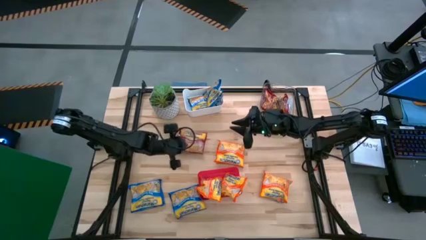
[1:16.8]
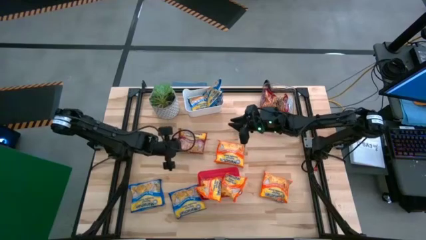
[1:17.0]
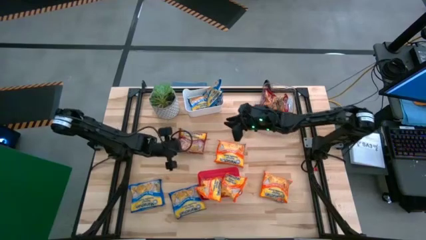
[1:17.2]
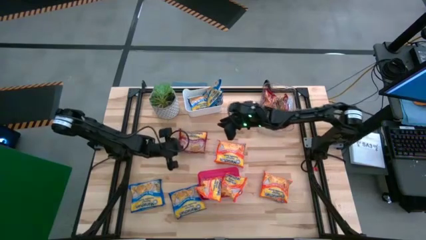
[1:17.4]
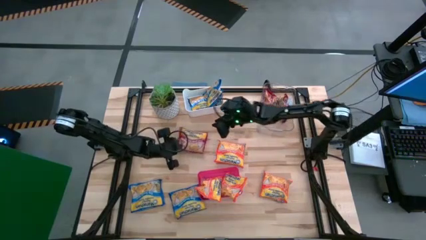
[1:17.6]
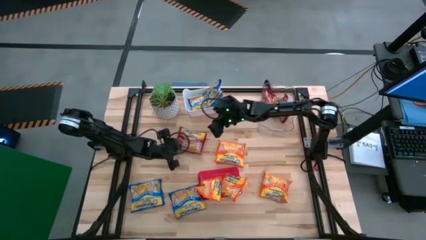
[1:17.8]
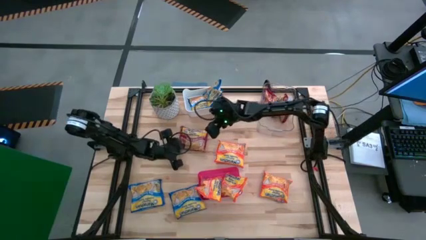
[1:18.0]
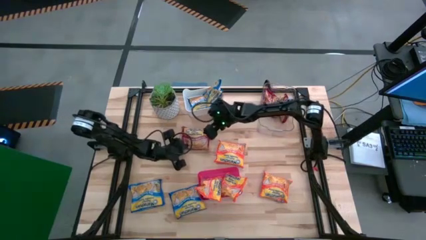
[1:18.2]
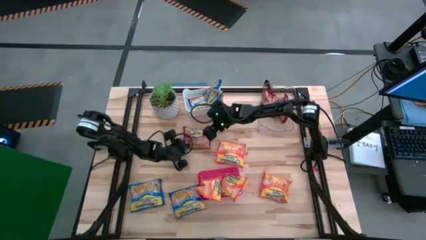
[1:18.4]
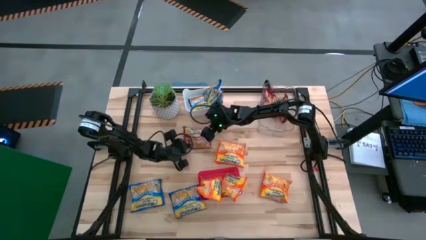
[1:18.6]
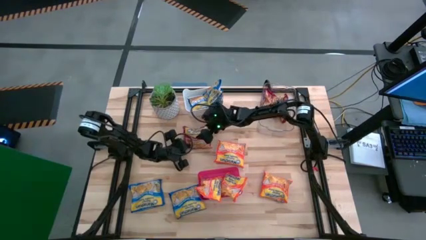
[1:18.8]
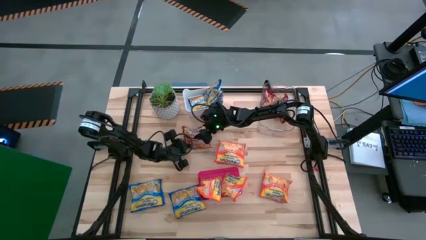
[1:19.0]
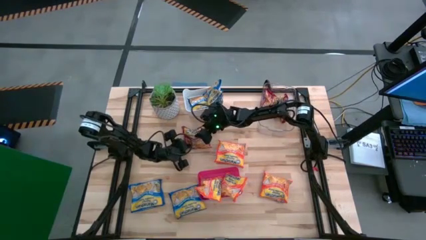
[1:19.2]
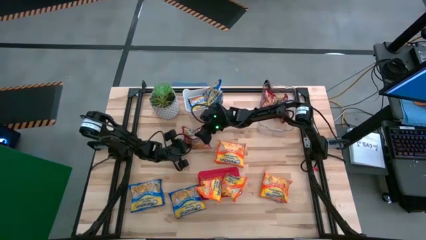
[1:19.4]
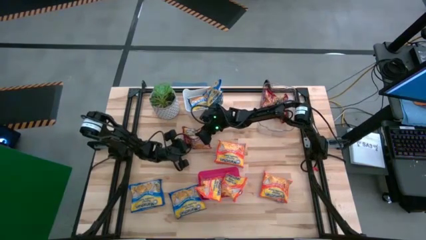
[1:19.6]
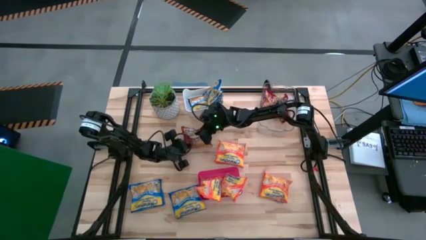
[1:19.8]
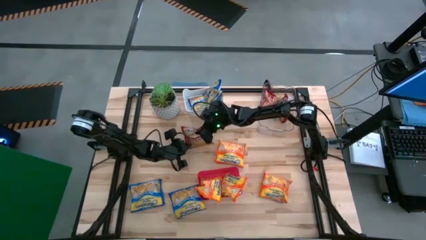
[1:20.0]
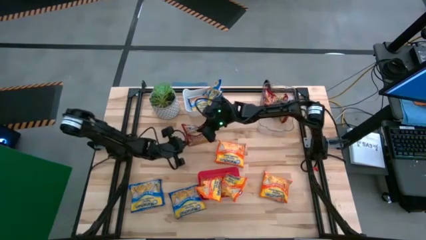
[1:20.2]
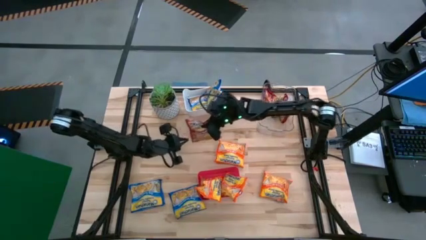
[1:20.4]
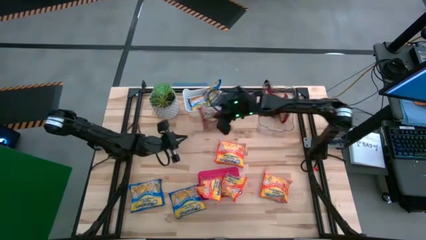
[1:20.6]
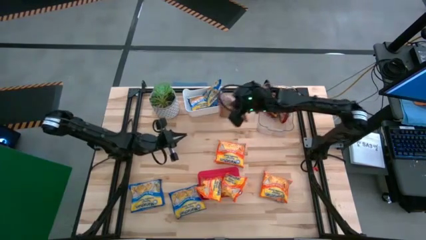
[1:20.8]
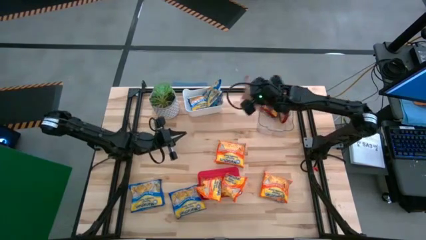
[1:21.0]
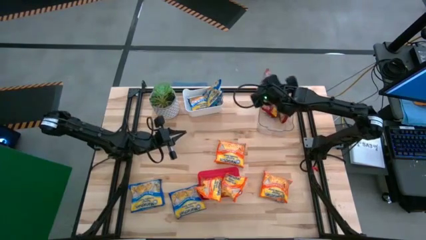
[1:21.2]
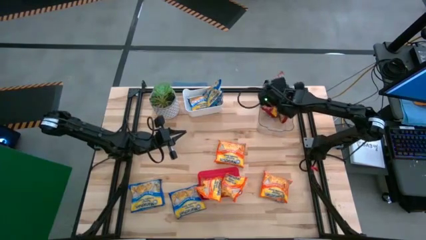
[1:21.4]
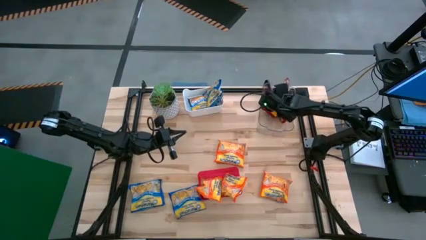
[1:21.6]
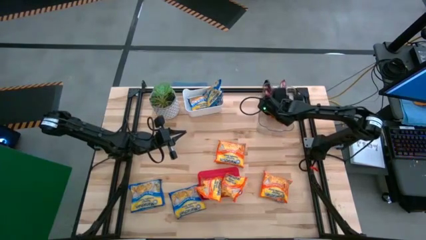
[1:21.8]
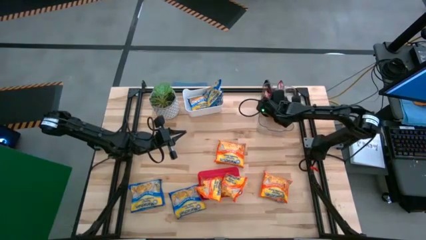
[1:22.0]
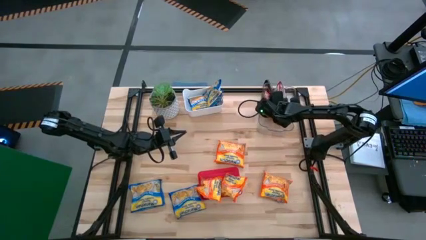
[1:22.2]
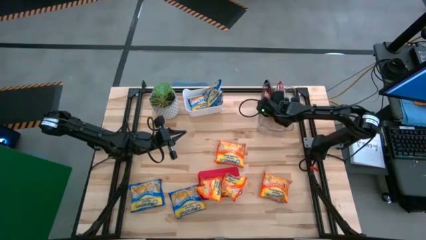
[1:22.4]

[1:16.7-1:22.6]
Task: Sort Maruchan noodles
Put the red noodle pack into the transparent bin

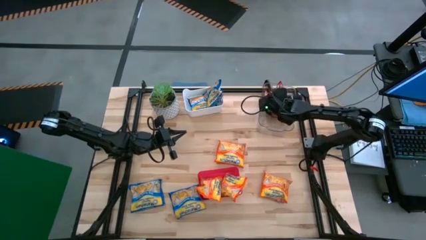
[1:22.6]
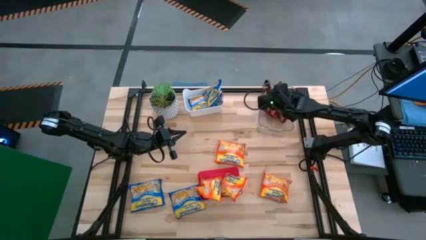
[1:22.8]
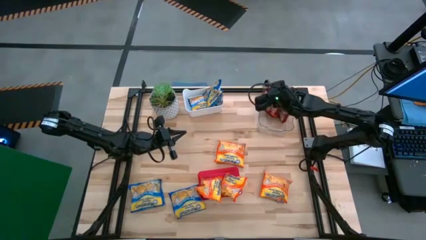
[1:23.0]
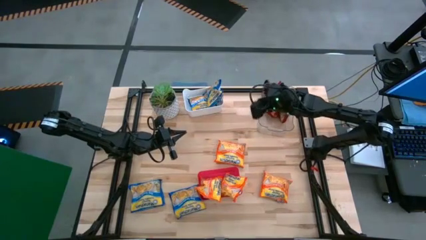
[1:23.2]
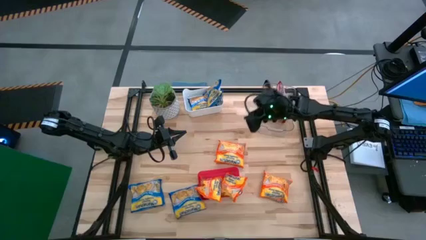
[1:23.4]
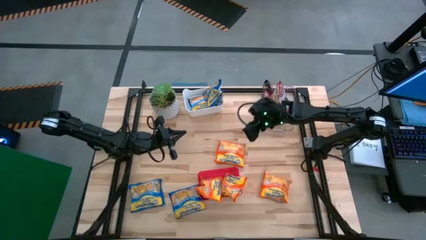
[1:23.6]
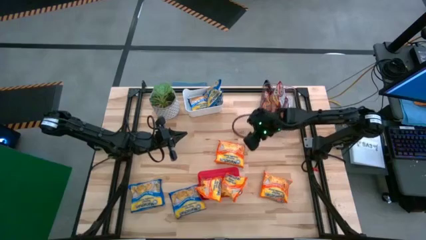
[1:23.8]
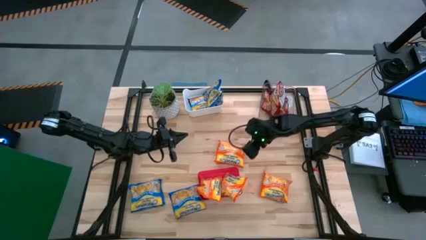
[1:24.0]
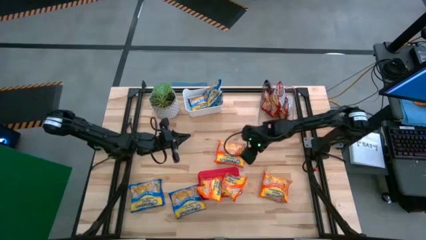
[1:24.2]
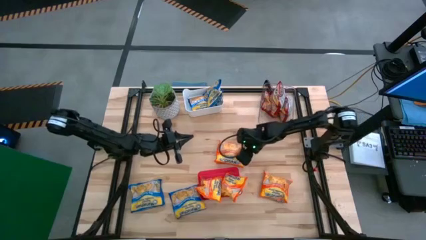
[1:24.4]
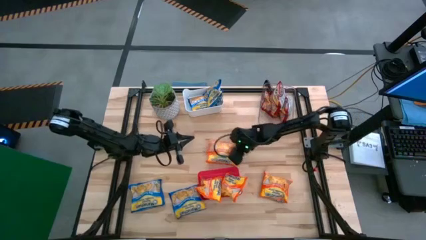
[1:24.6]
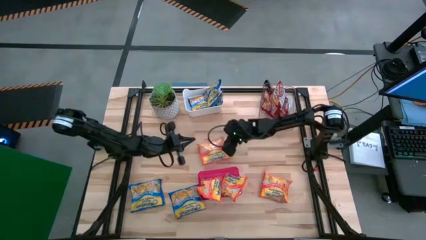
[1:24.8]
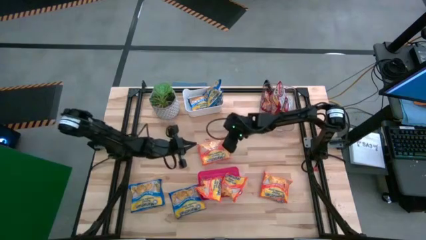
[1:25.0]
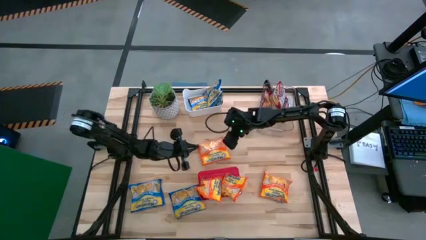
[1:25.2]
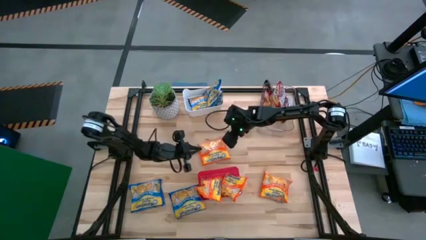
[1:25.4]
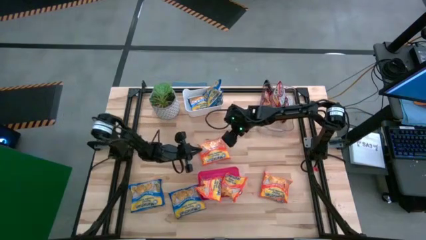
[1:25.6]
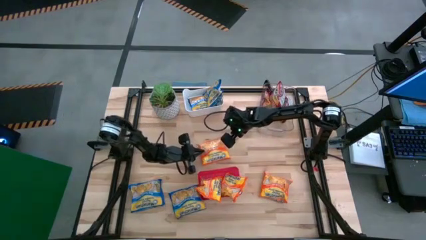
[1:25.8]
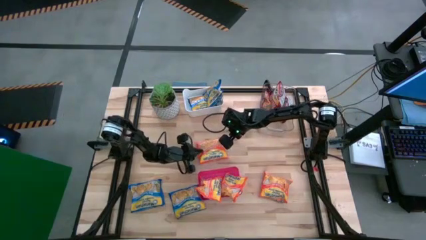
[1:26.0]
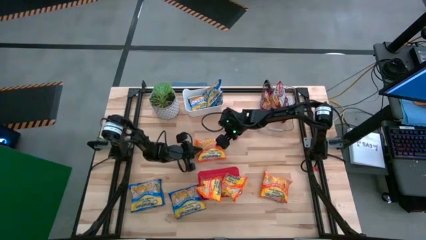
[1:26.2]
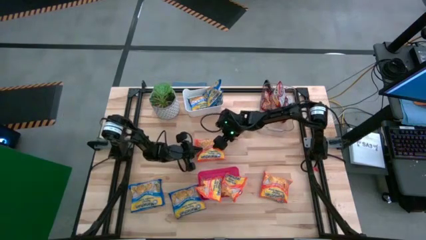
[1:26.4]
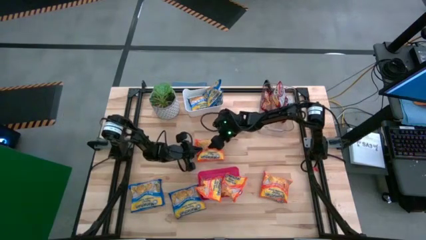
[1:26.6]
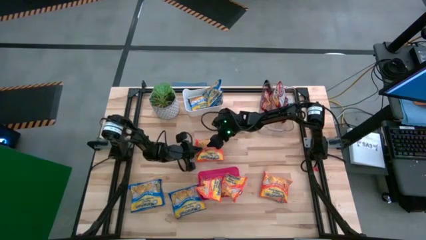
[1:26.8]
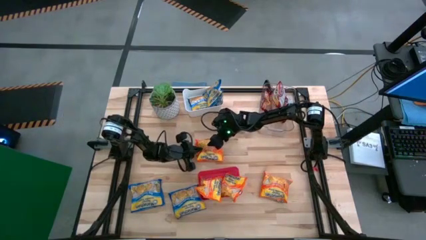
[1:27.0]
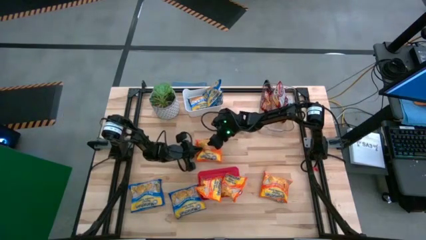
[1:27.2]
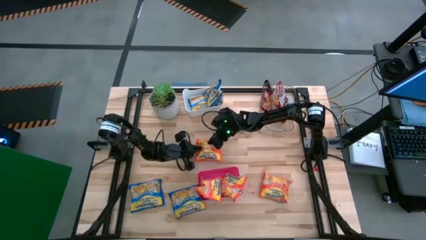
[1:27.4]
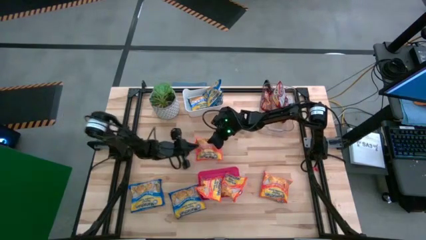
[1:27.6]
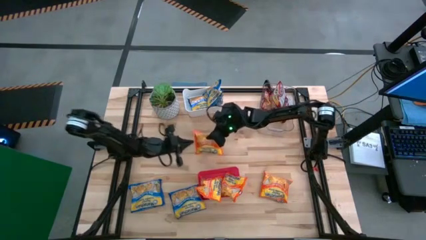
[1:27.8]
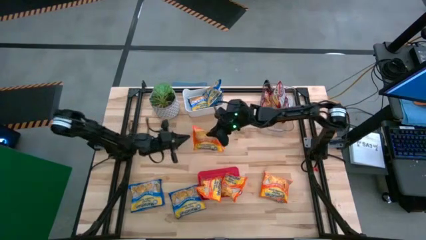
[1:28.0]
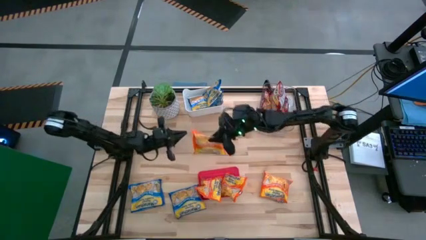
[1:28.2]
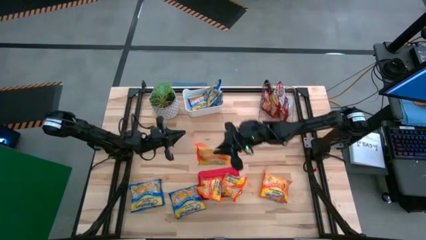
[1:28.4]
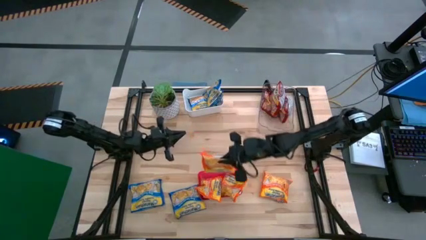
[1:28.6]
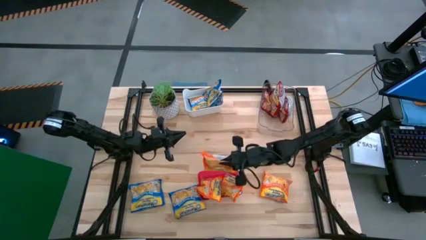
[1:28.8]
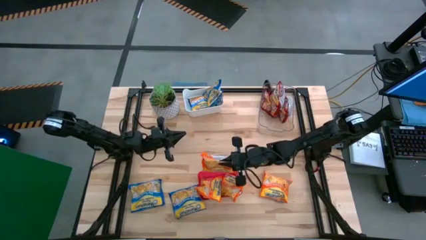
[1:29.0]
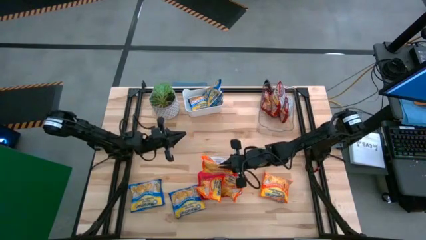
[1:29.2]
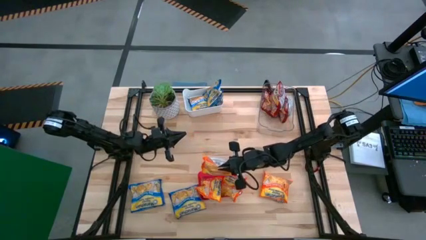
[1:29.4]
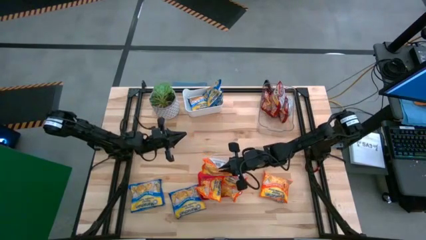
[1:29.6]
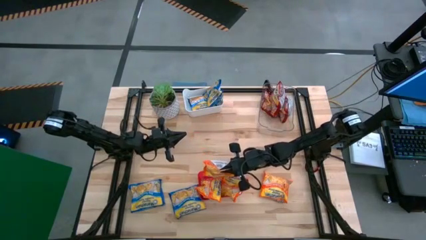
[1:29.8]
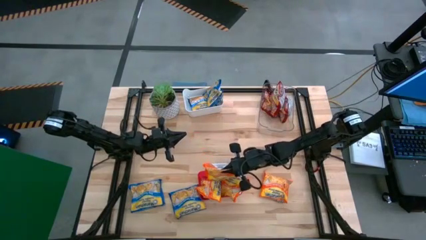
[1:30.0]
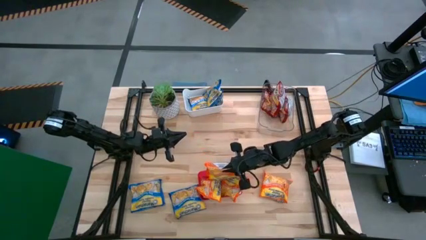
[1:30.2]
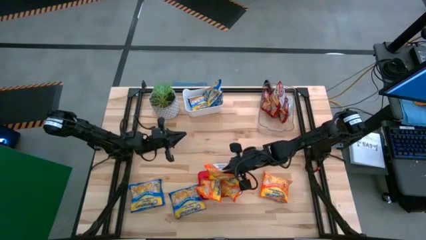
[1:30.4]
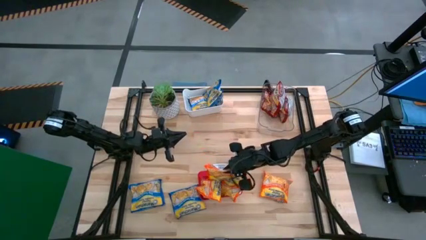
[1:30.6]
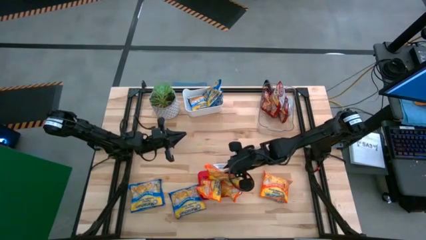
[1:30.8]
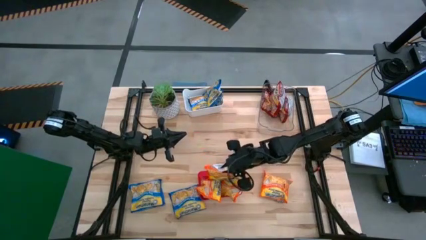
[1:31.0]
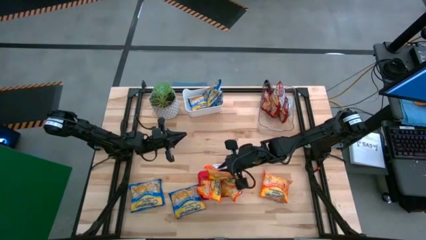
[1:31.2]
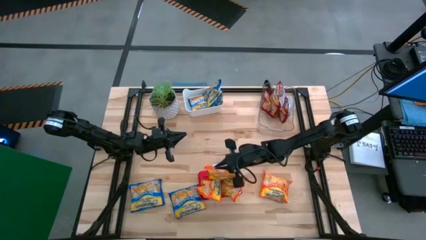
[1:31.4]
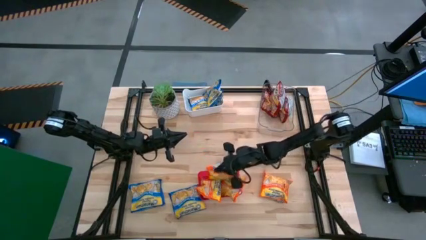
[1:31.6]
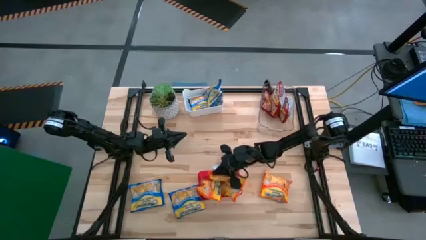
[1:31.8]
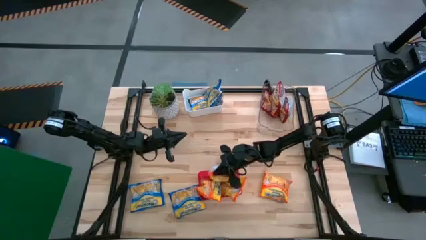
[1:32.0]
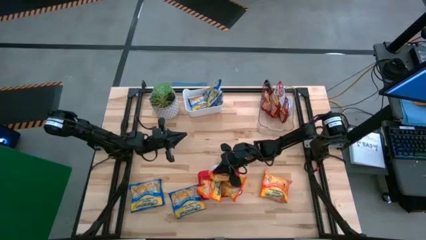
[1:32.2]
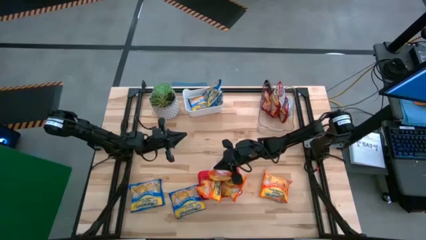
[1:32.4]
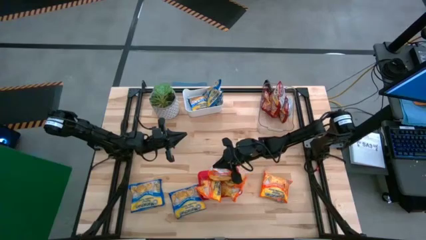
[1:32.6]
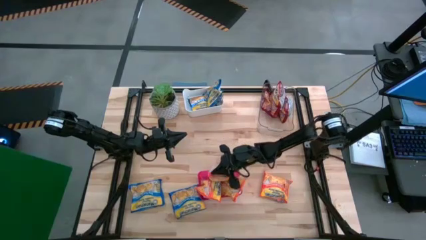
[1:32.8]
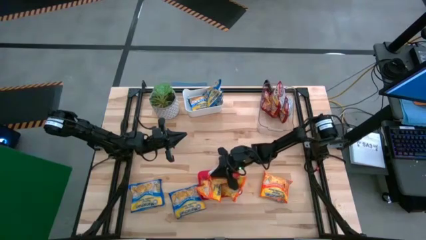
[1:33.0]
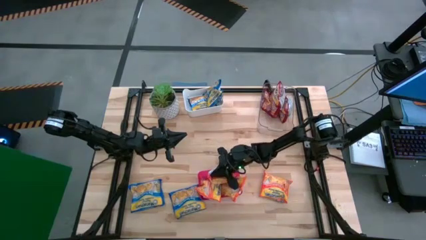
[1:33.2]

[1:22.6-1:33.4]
Put the orange noodle pack into the red bin

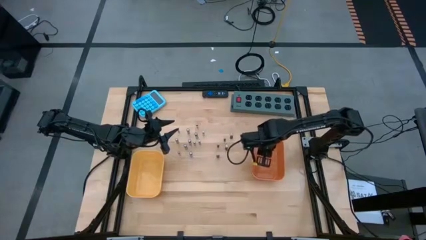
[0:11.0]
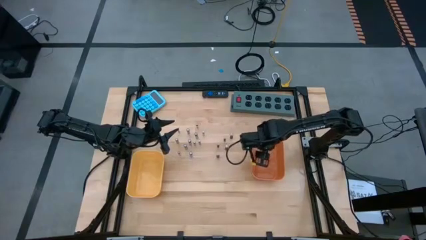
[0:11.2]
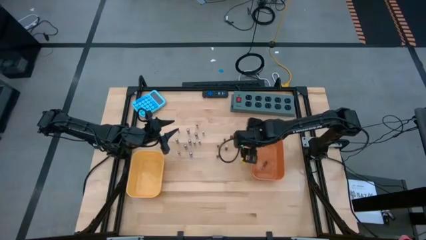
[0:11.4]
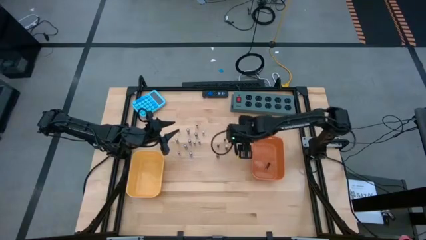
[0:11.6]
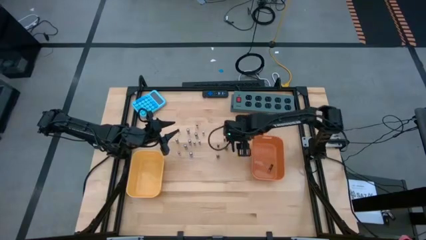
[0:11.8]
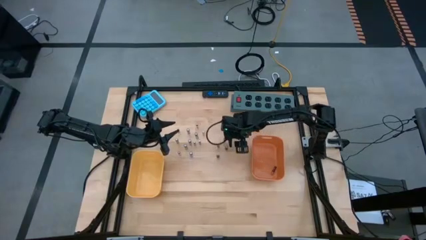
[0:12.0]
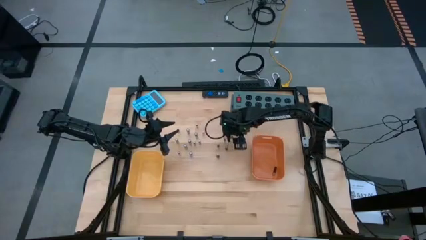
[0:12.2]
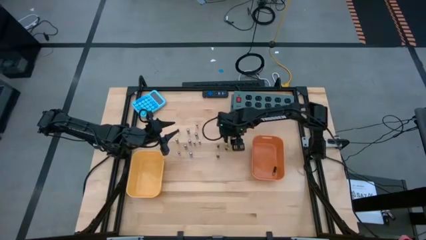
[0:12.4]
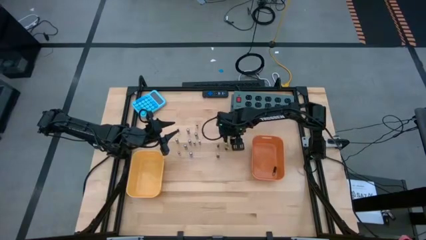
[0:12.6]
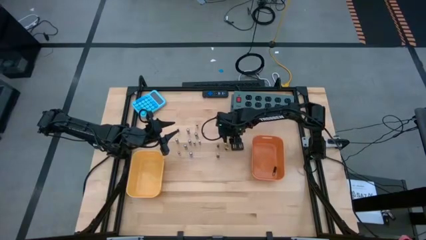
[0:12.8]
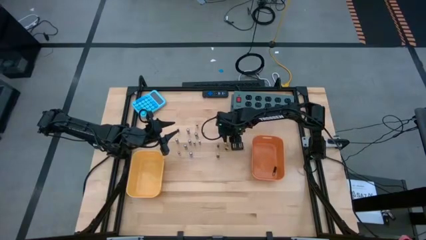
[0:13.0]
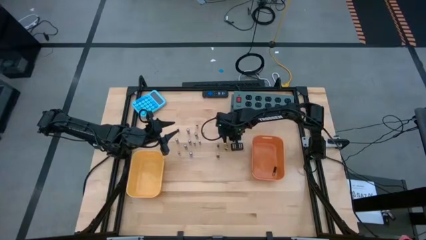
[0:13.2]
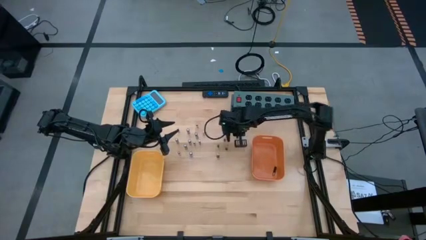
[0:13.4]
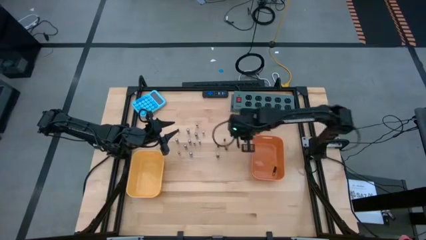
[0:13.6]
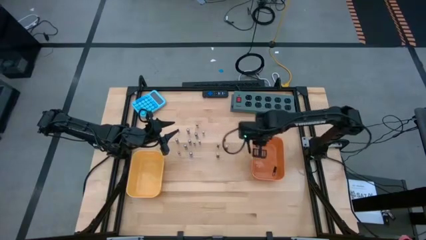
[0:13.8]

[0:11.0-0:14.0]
Task: Sort batteries
Put the brown battery into the orange bin
